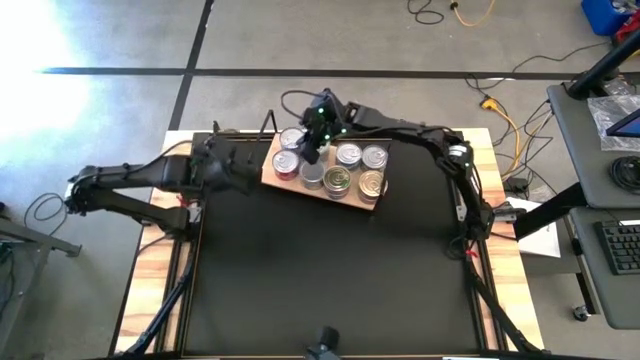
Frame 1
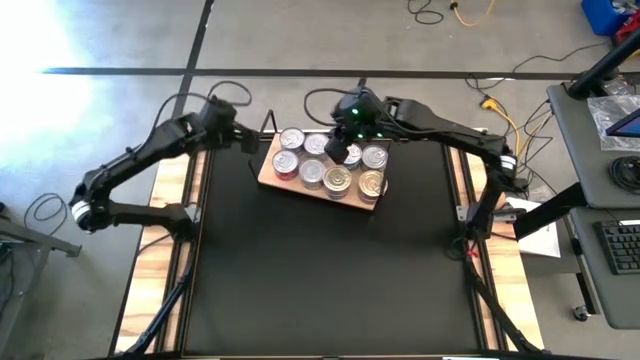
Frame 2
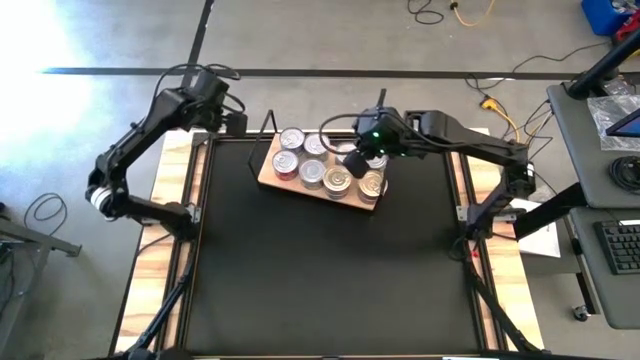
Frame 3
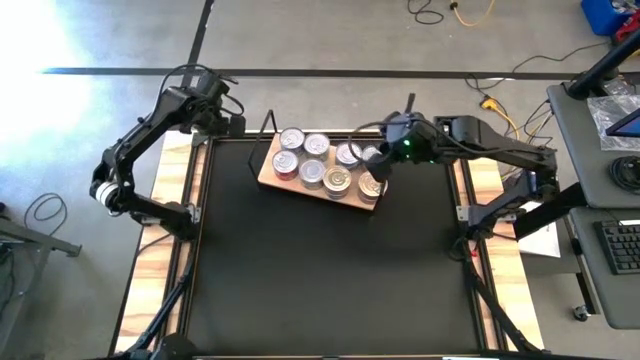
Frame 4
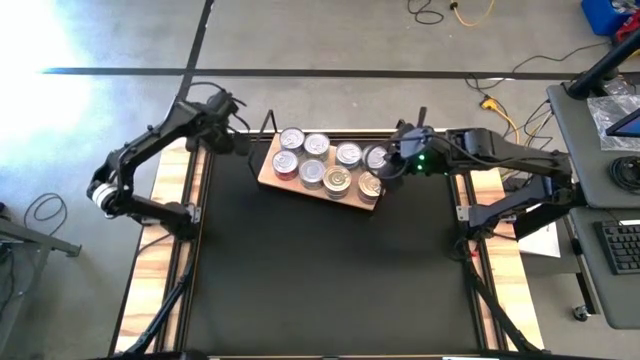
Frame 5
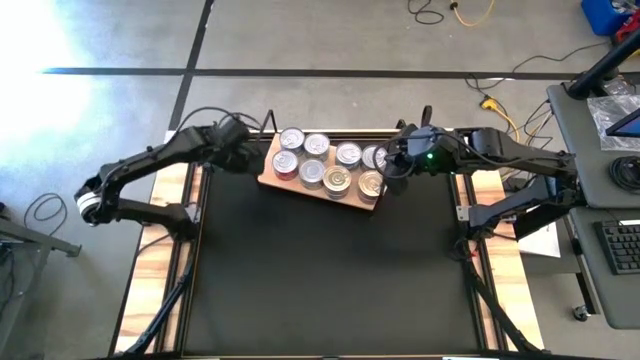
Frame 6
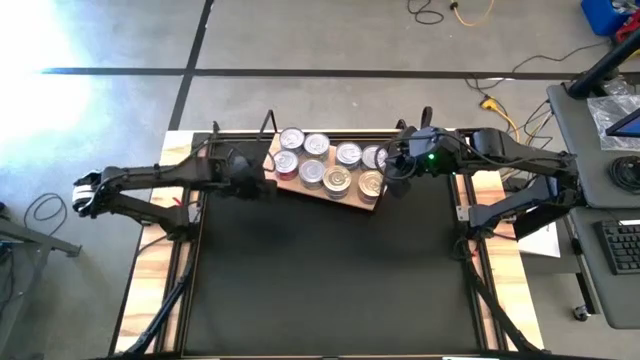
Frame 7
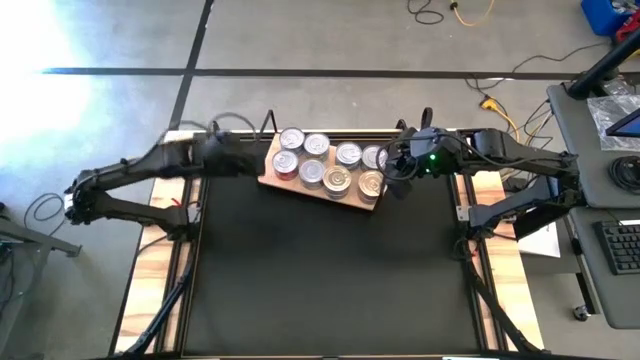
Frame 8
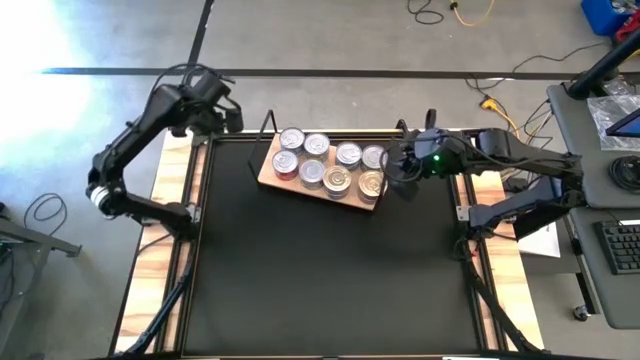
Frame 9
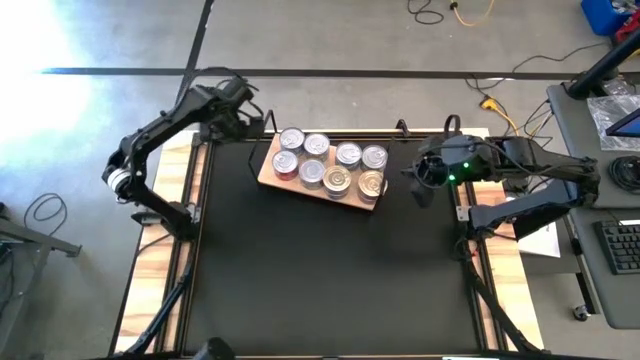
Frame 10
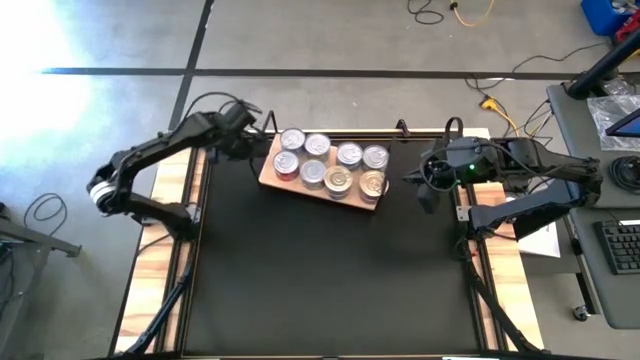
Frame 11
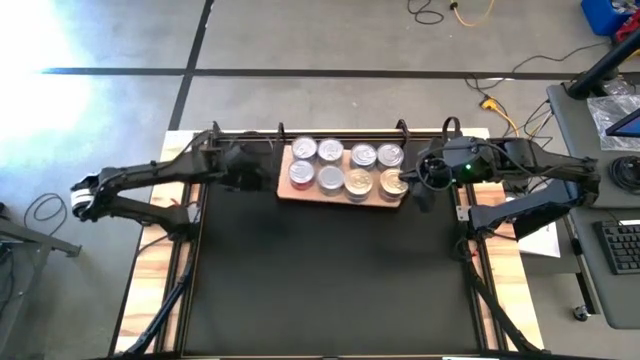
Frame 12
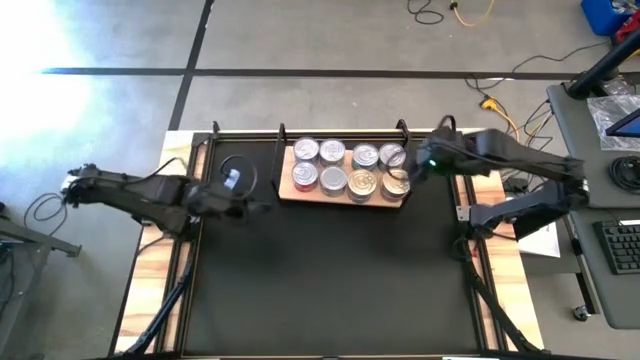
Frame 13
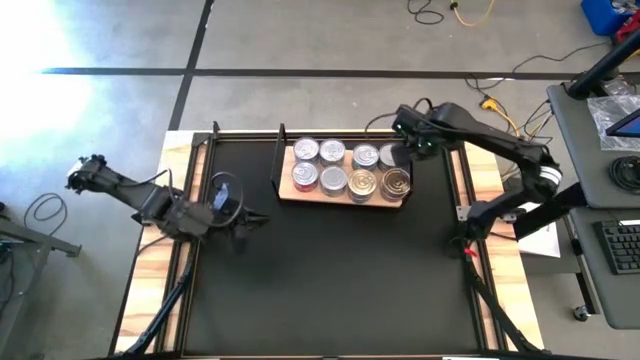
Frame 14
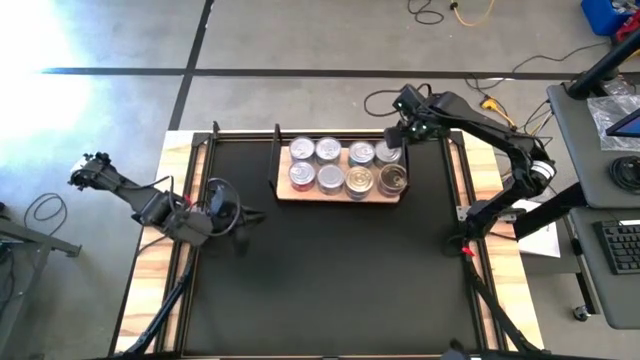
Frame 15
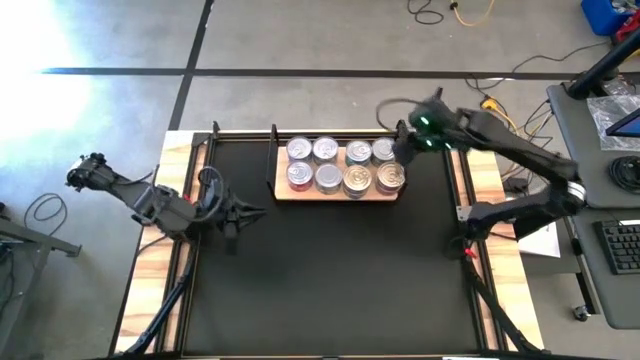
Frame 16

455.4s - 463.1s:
Task: Stack canned seafood by type on shelf
Adjust the shelf

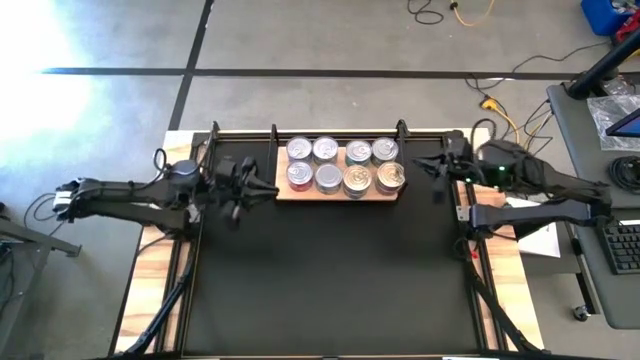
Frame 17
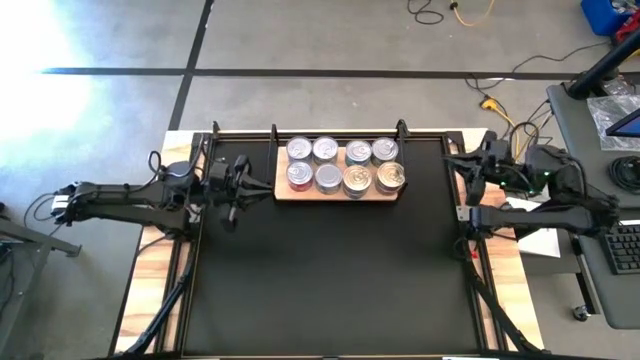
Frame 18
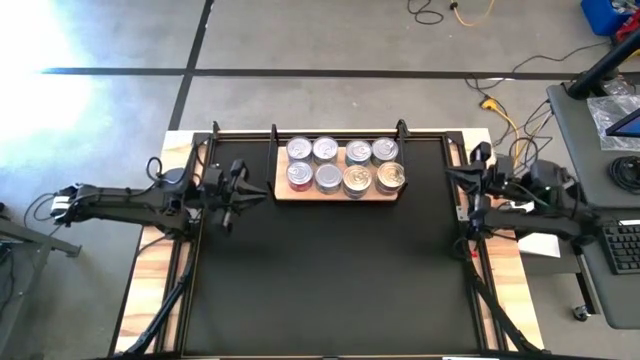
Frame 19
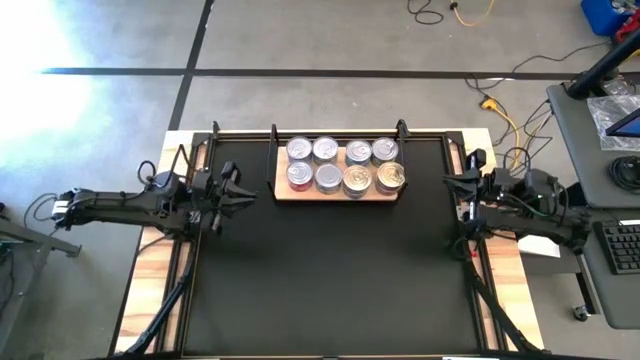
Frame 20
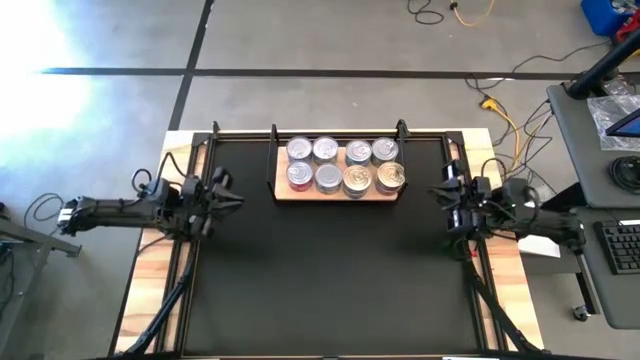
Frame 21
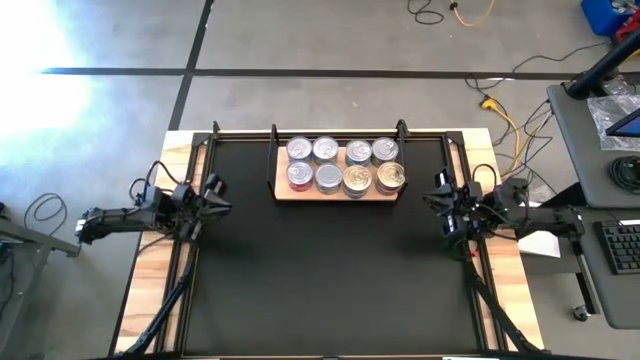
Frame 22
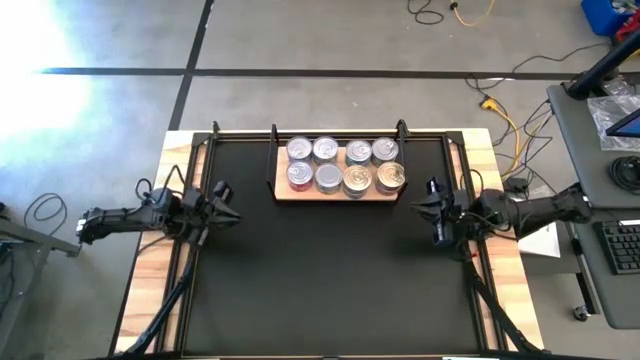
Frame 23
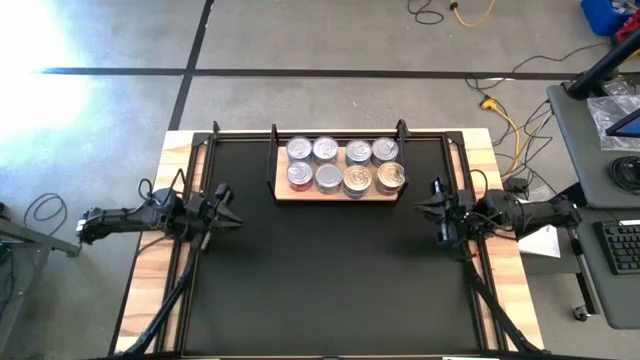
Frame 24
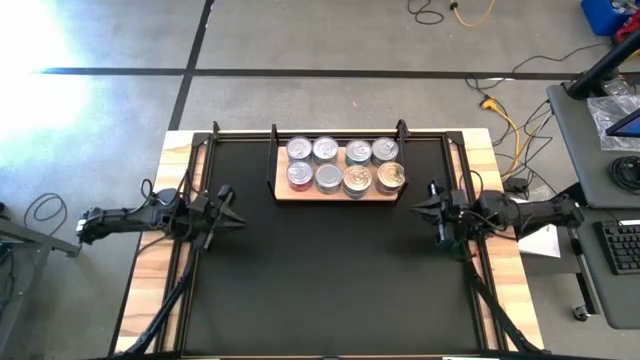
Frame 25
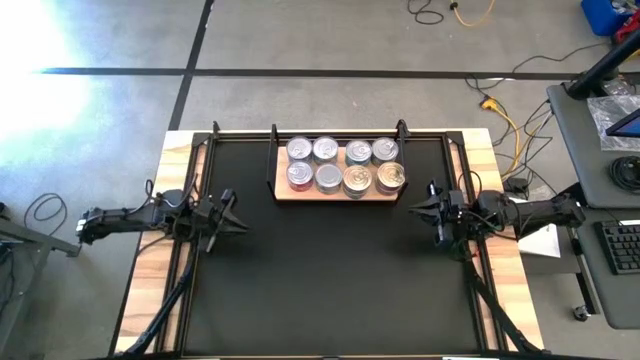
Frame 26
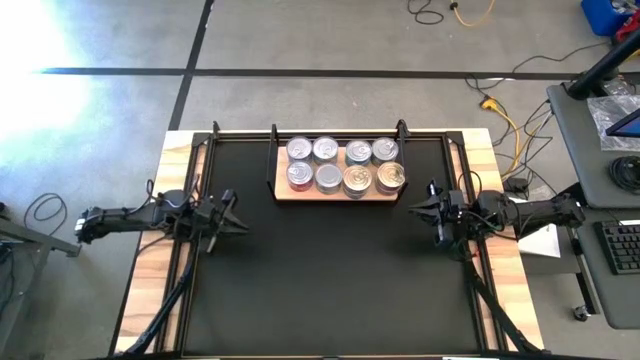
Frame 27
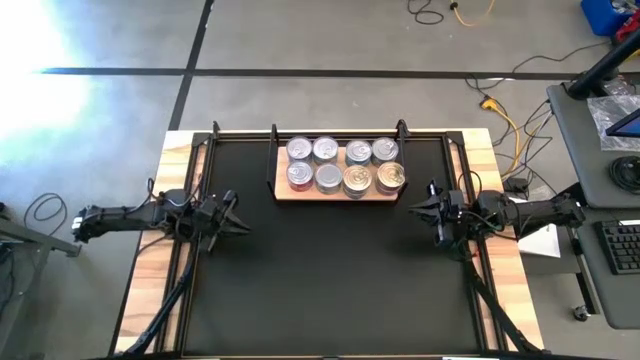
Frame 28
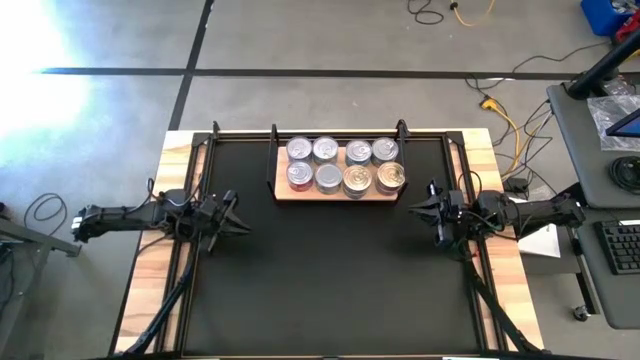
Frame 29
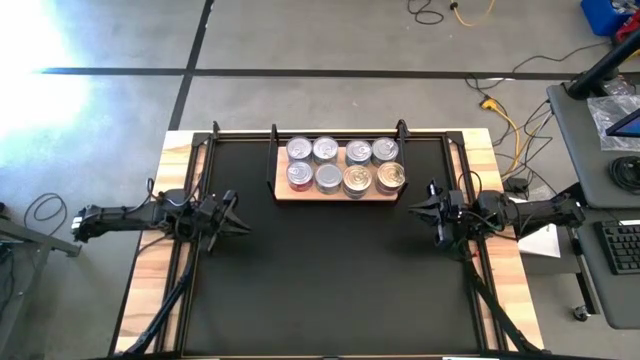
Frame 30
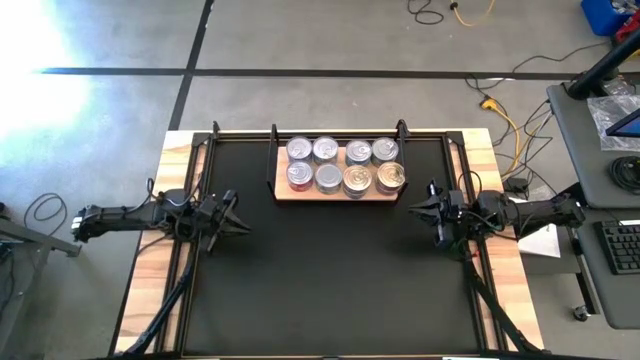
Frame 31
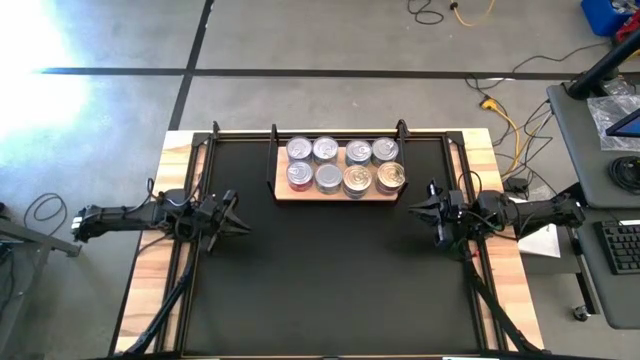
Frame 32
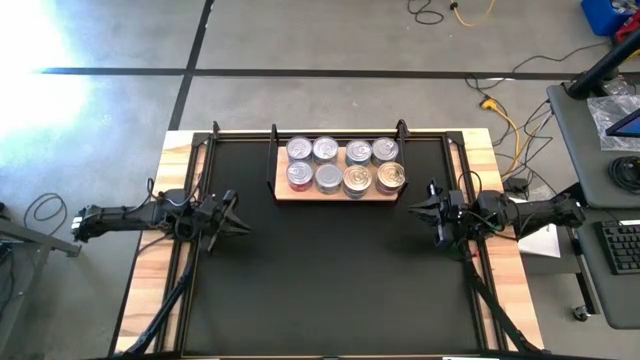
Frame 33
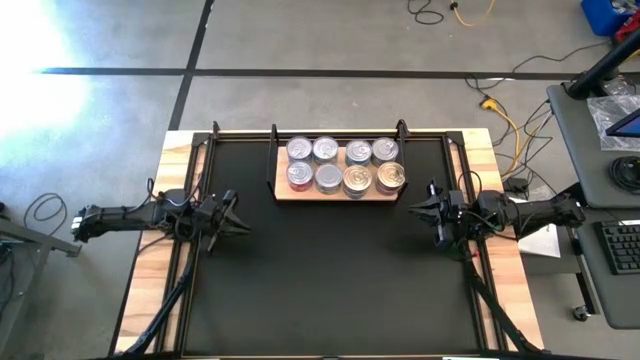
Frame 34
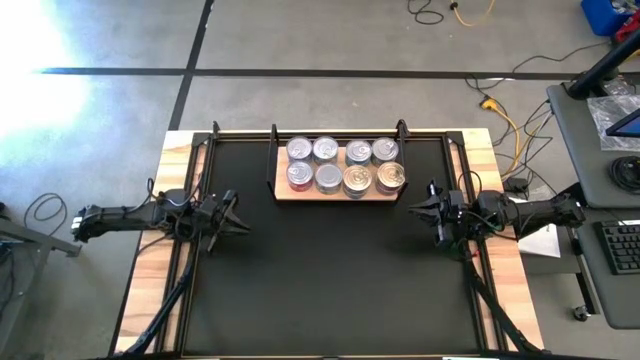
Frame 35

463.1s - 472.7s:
Return to Home Position

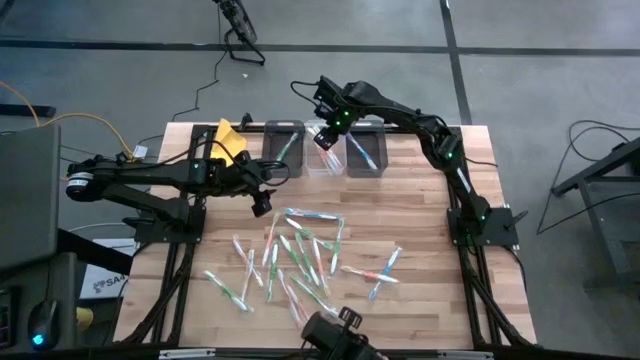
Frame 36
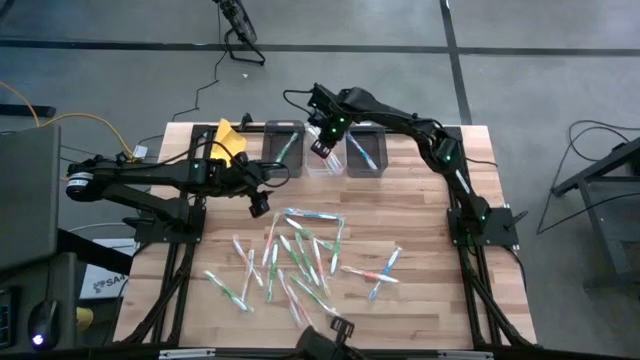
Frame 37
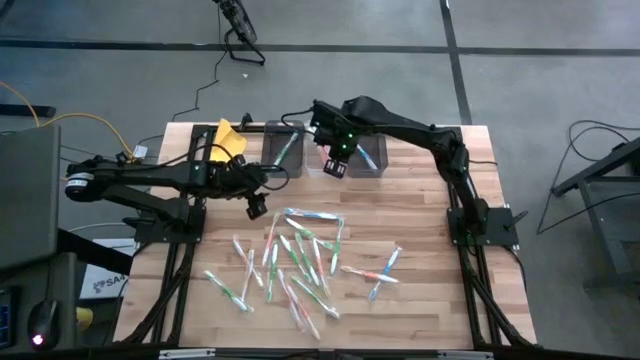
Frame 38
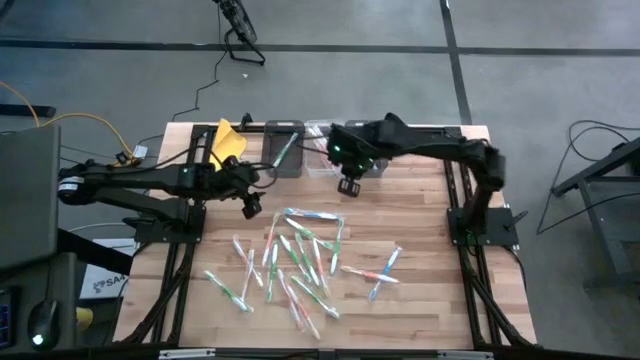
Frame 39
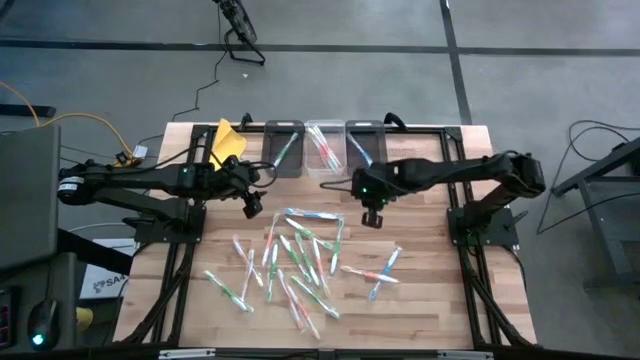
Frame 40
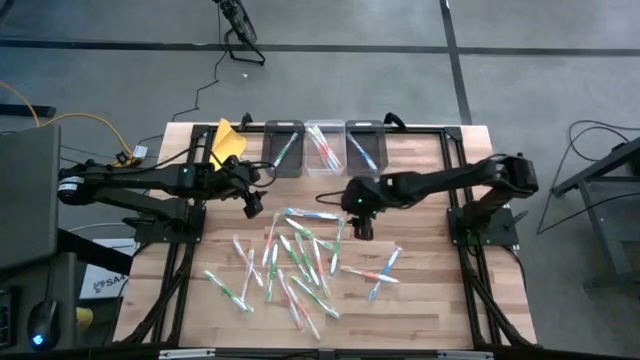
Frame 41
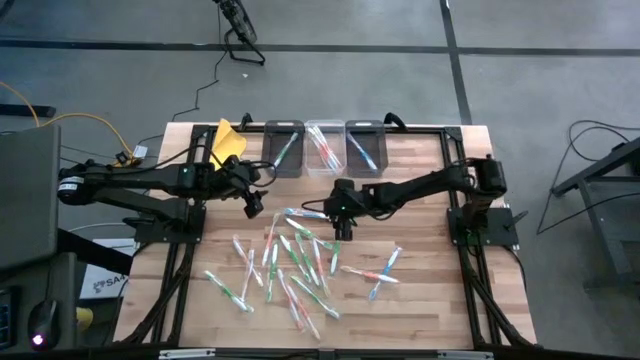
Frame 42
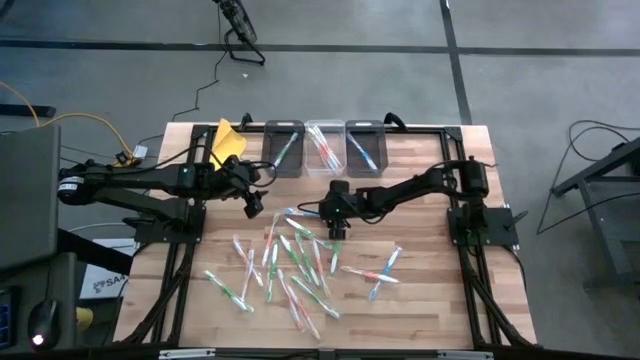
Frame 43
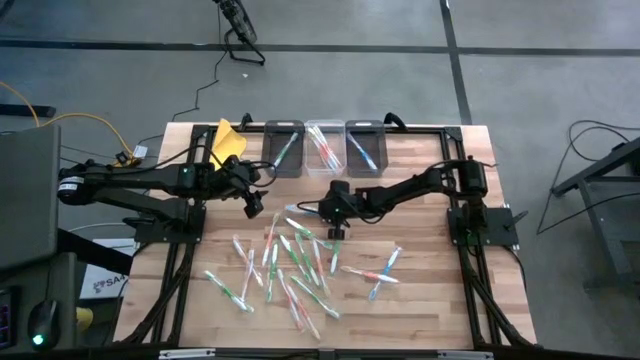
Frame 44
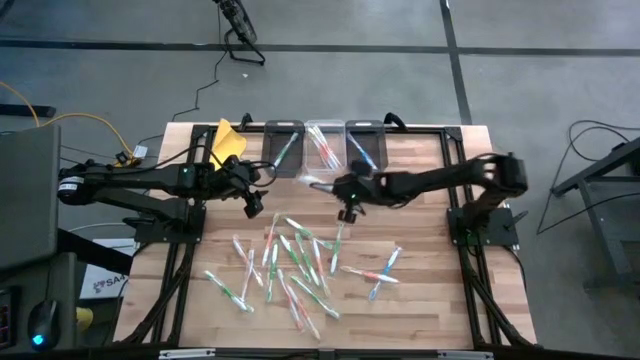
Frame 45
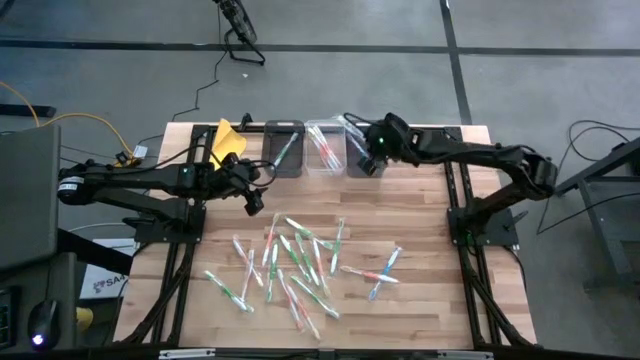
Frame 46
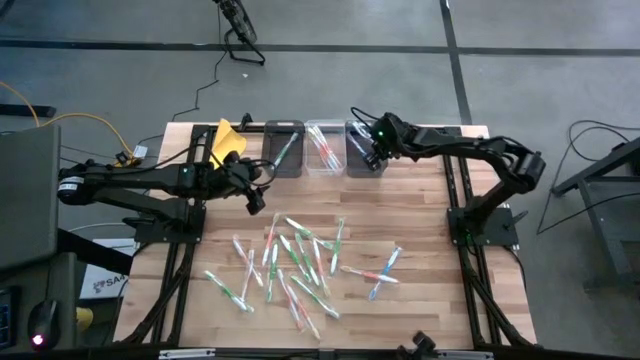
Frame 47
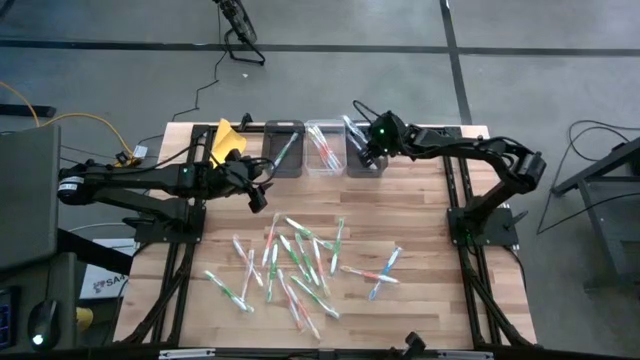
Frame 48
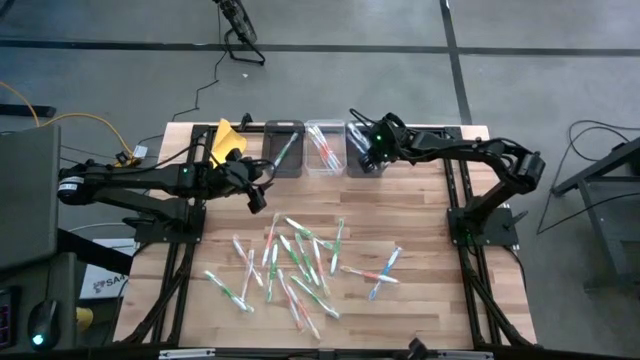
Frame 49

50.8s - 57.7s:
Task: Pick & Place Toothbrushes
Put the blue toothbrush into the right black bin
